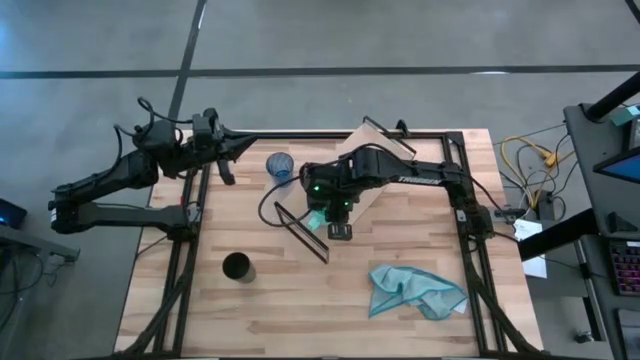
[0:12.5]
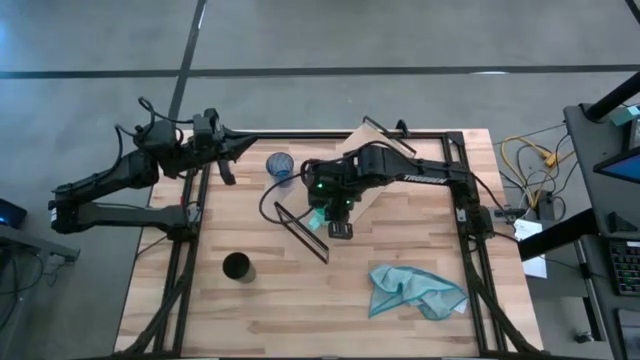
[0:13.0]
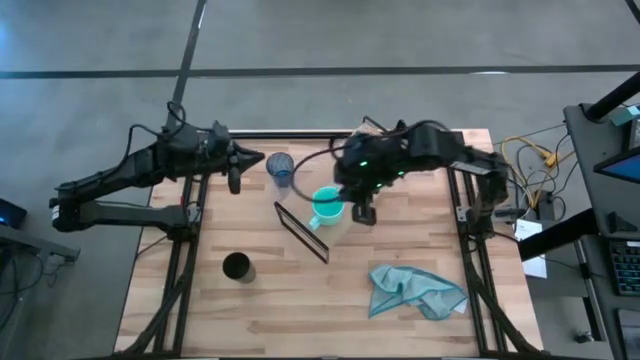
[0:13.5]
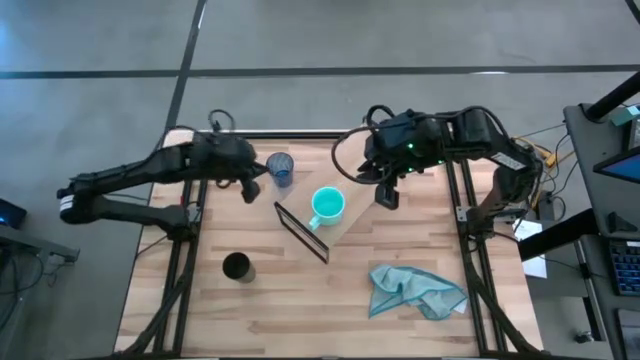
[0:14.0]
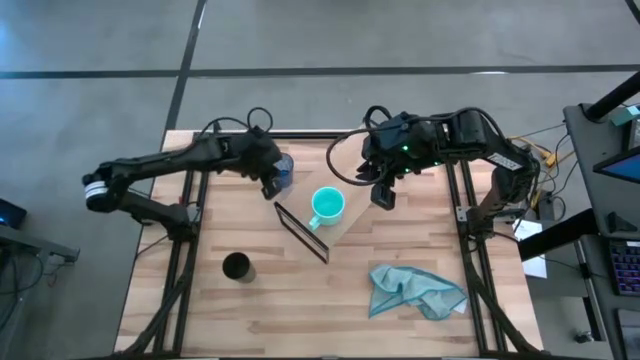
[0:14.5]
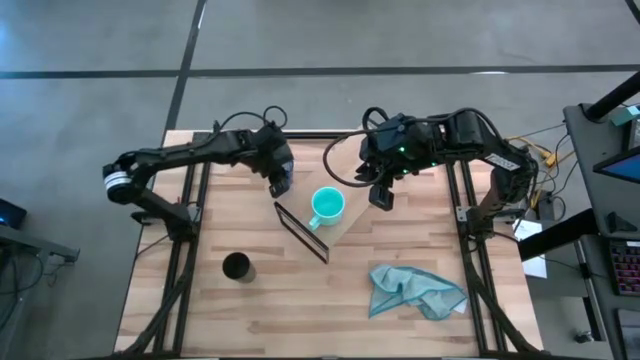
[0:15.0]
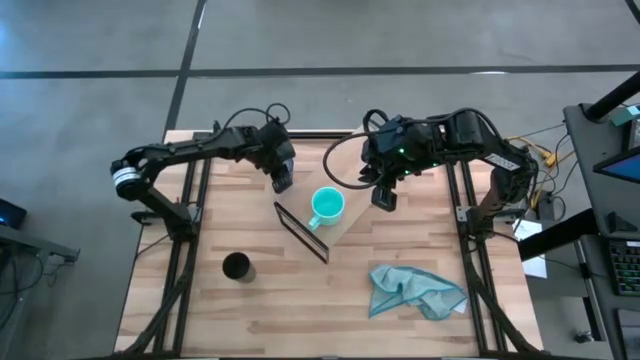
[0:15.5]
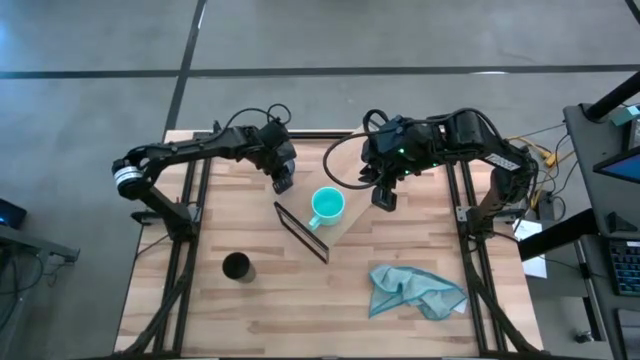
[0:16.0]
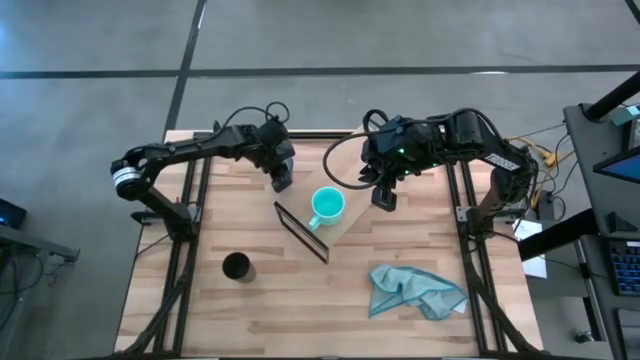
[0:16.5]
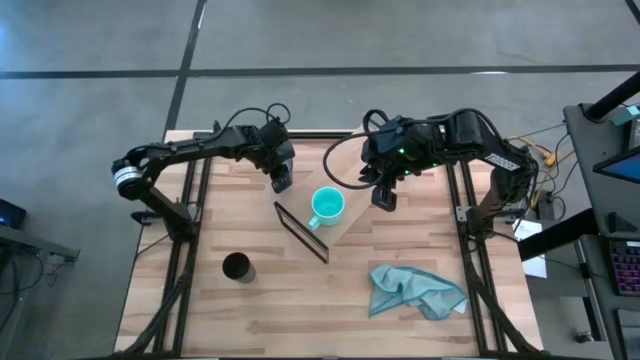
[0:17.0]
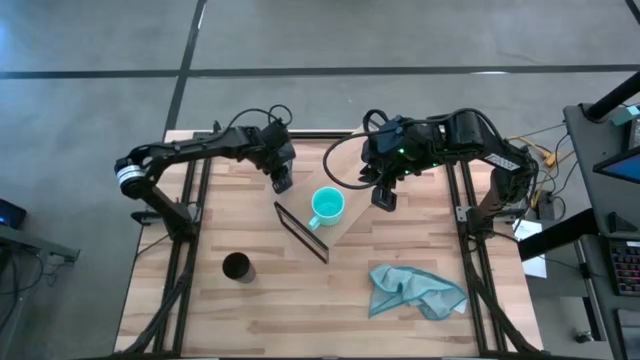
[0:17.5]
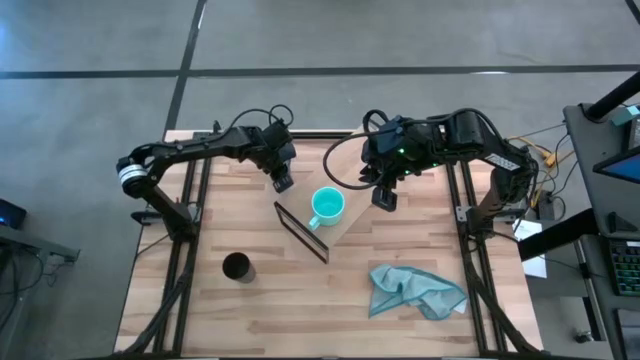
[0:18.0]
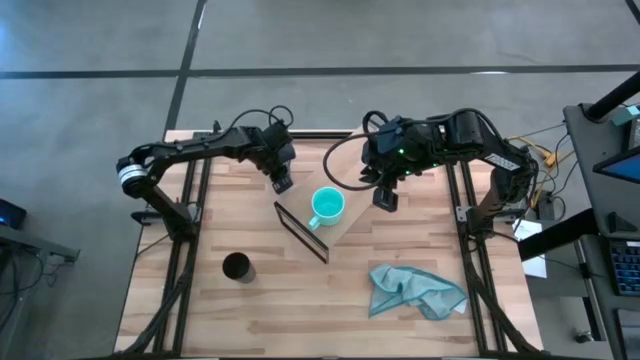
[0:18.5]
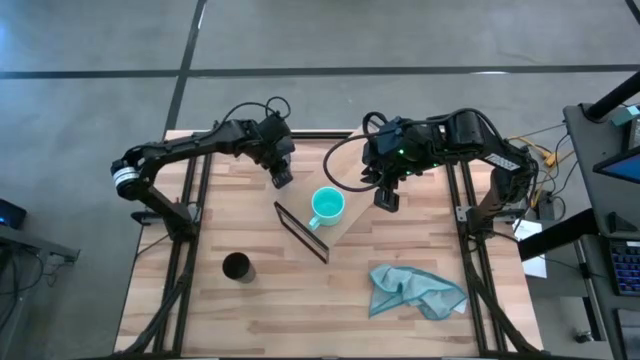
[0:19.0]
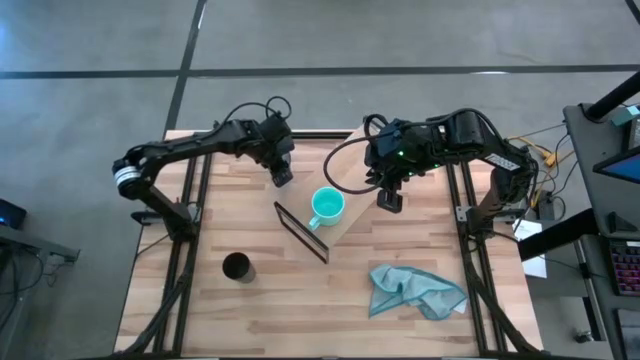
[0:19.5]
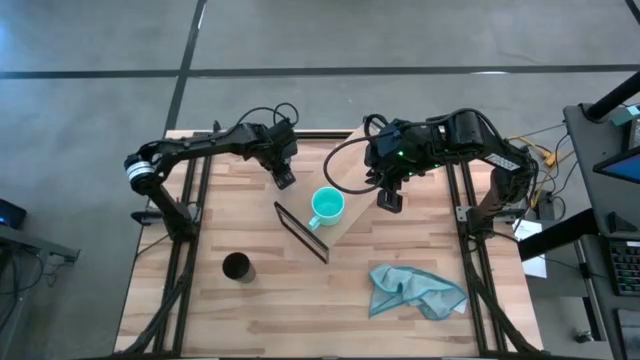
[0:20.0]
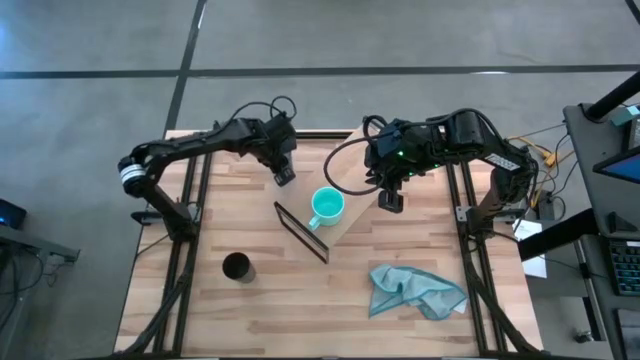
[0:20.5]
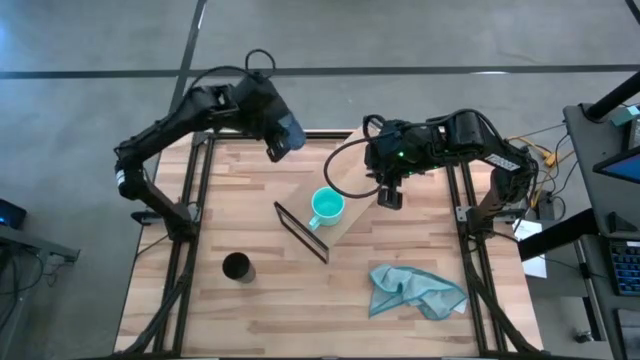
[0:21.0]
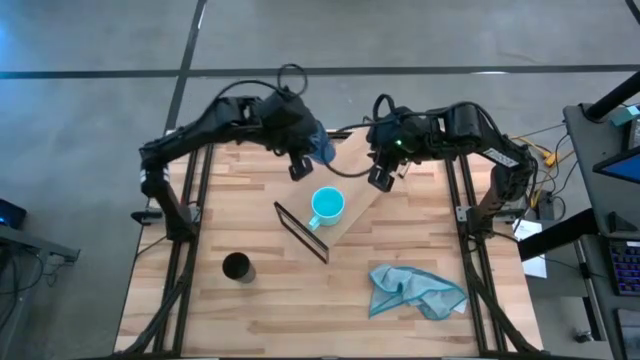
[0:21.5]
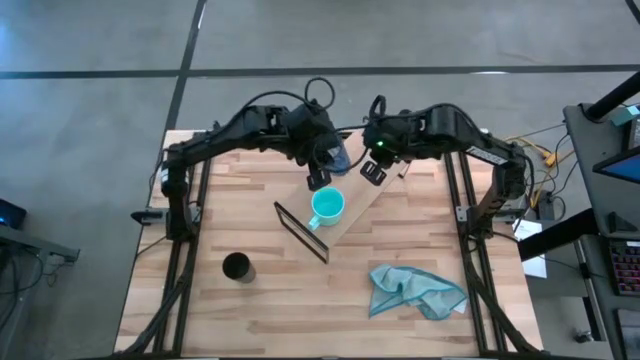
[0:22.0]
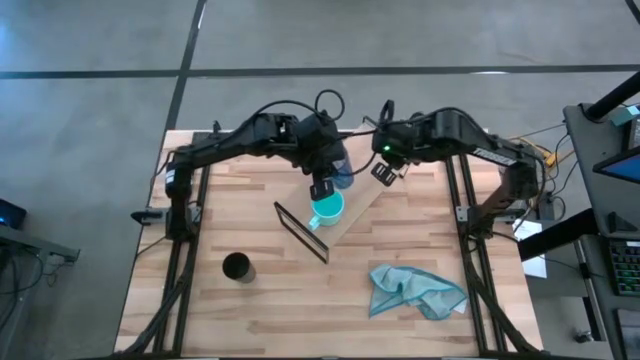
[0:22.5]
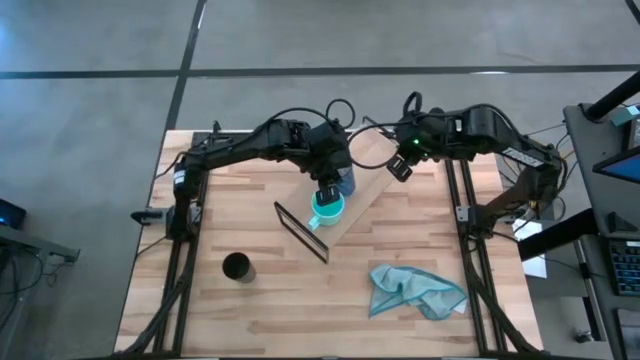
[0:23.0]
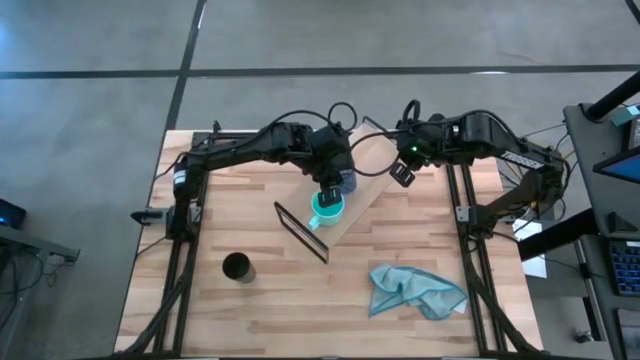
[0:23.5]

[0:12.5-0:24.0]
Task: Stack small to large cups/mugs on shelf
Put the blue cup on the shelf

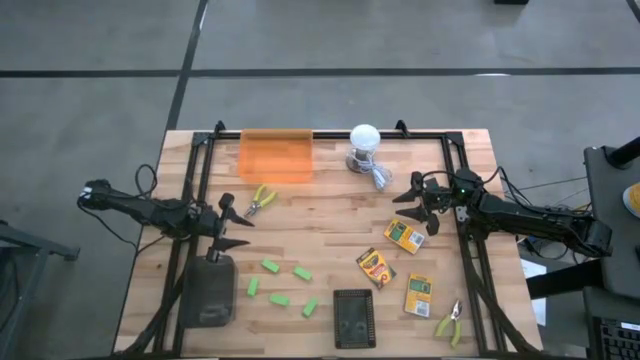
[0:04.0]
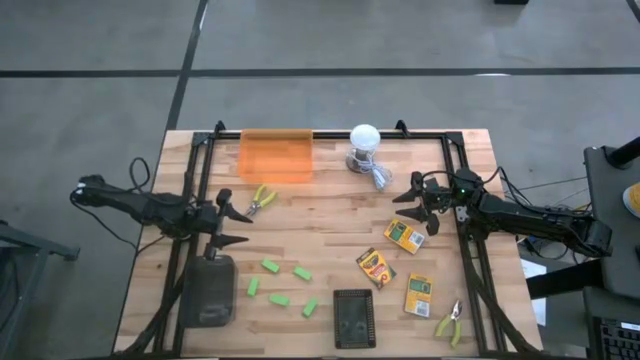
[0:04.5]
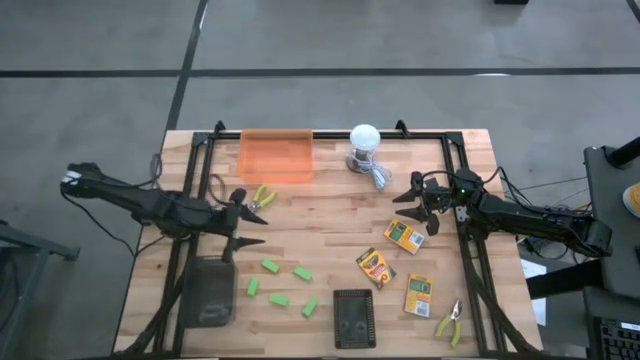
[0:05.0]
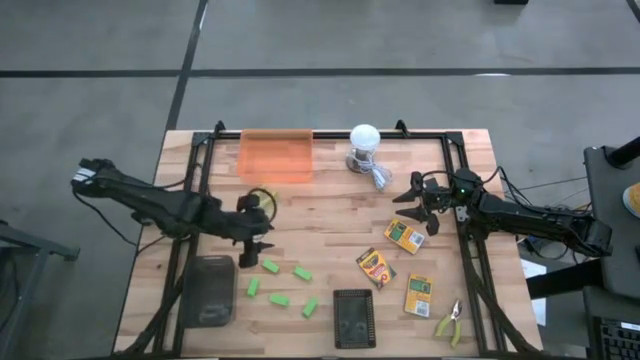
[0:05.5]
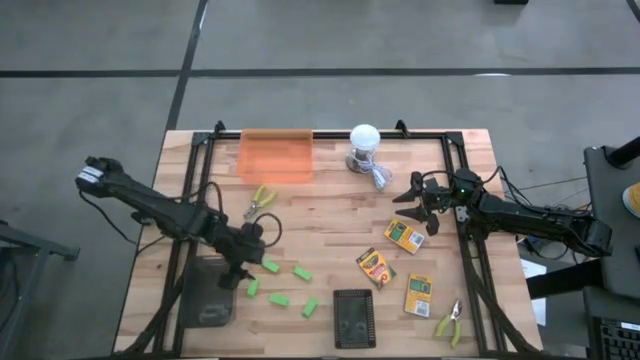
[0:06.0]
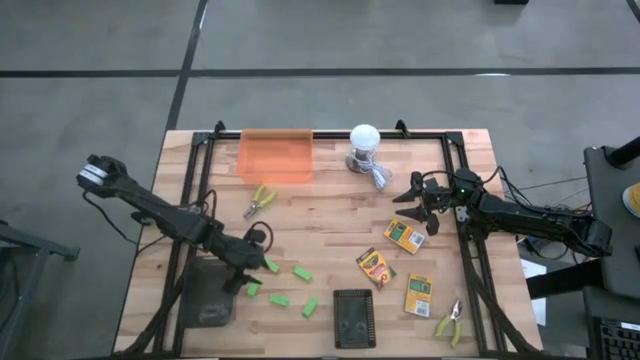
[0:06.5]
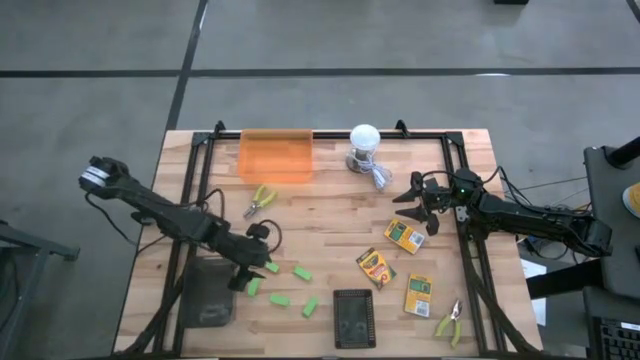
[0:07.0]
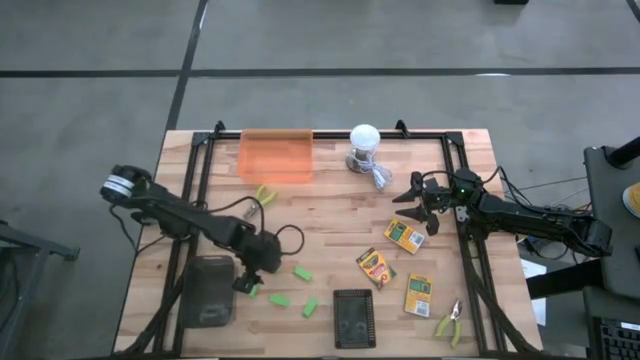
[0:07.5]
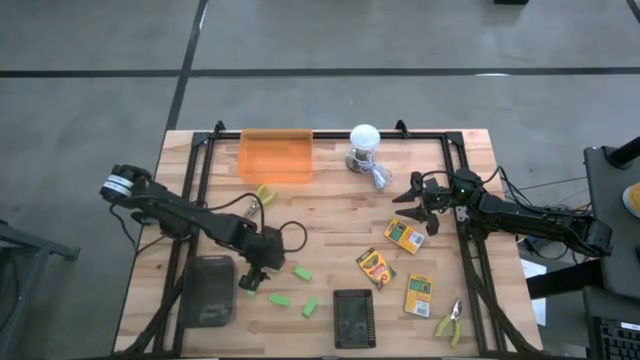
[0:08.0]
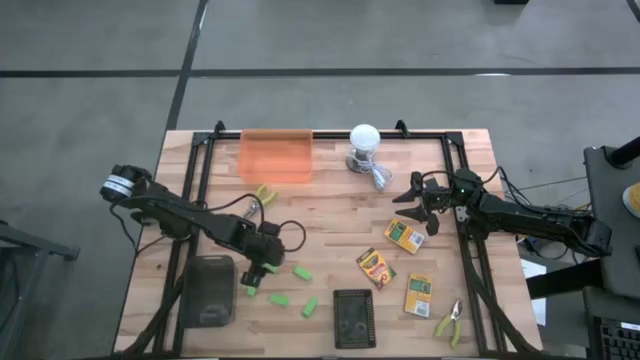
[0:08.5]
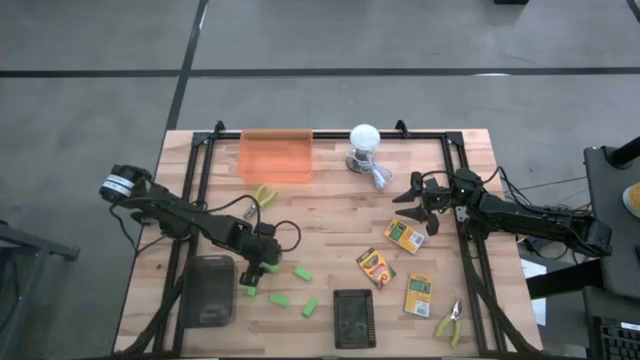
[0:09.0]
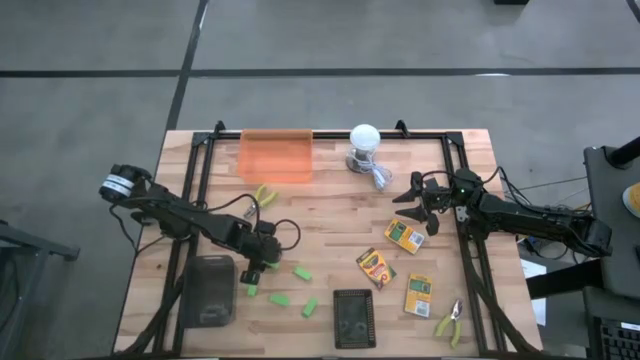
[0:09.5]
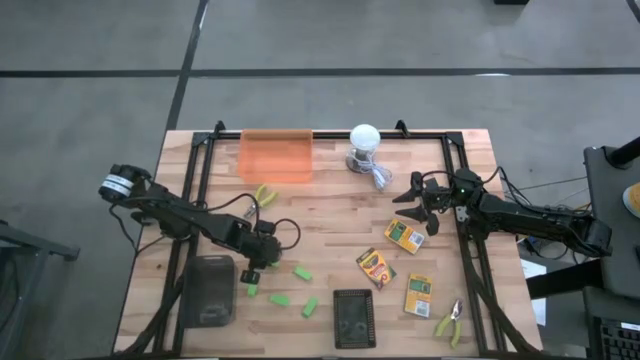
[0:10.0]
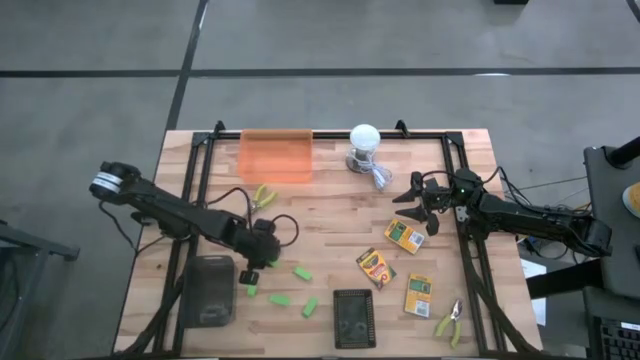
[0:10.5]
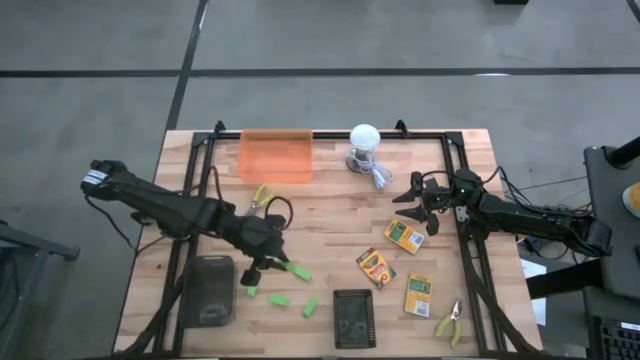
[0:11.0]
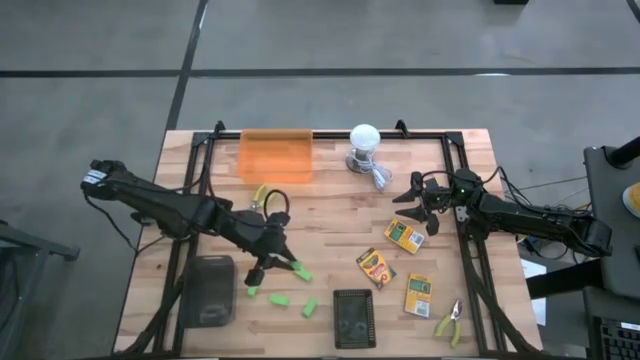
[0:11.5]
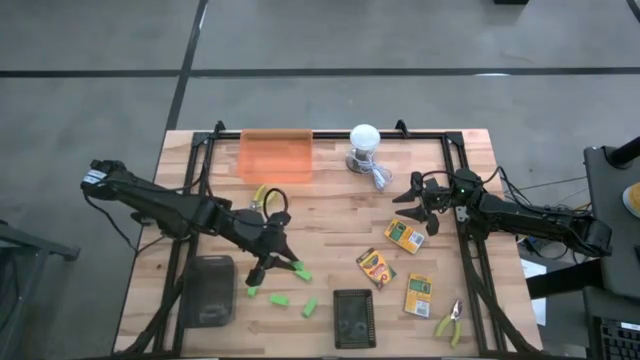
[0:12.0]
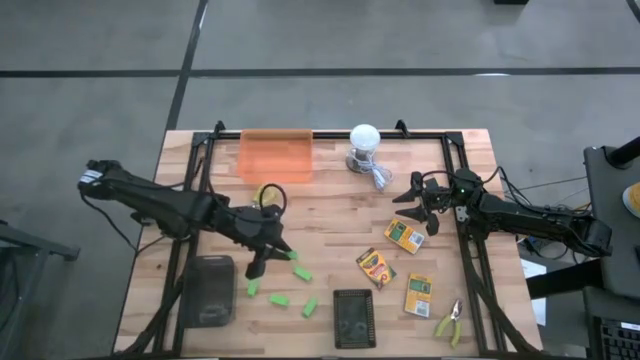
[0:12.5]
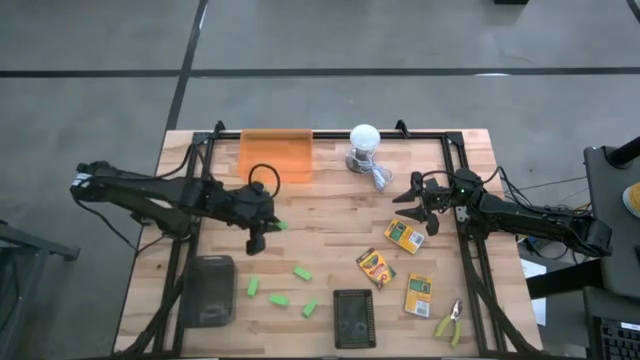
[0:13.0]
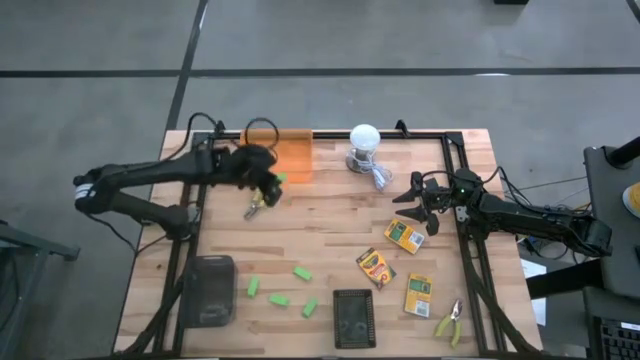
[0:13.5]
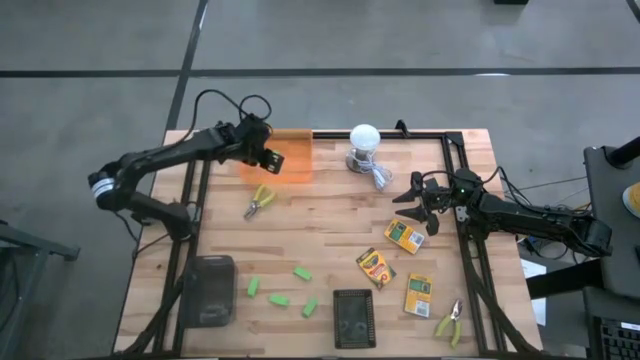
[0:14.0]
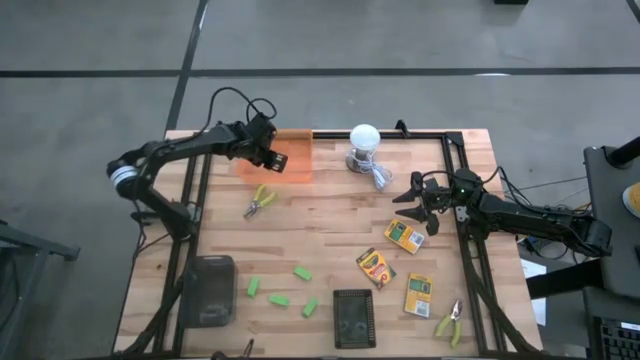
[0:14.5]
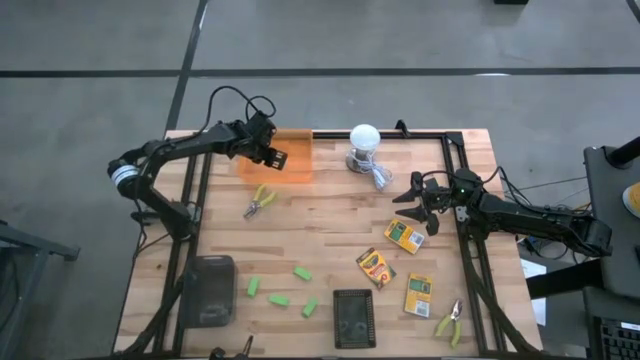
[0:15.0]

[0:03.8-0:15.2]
Task: Pick & Place School Supplies
Put the green eraser into the orange bin
